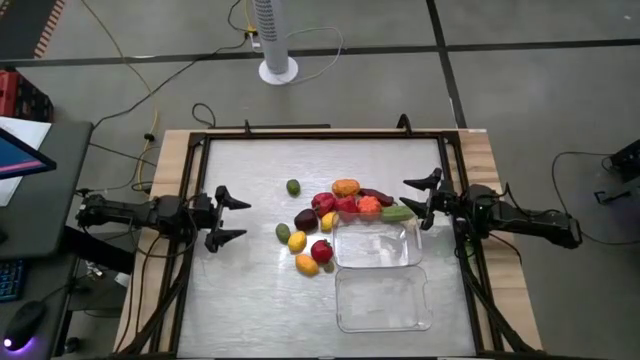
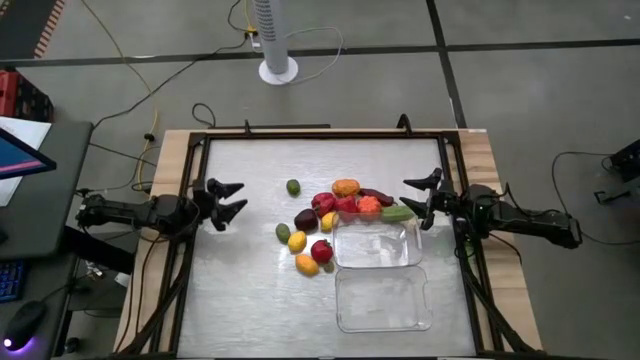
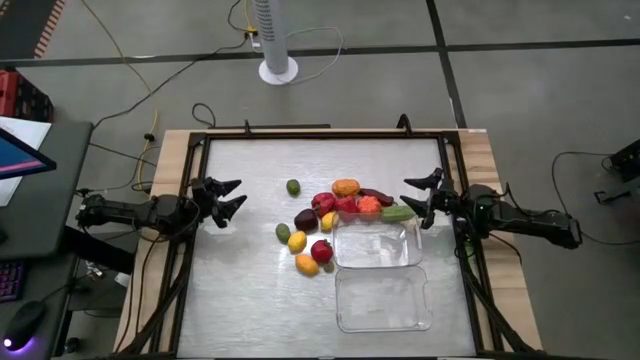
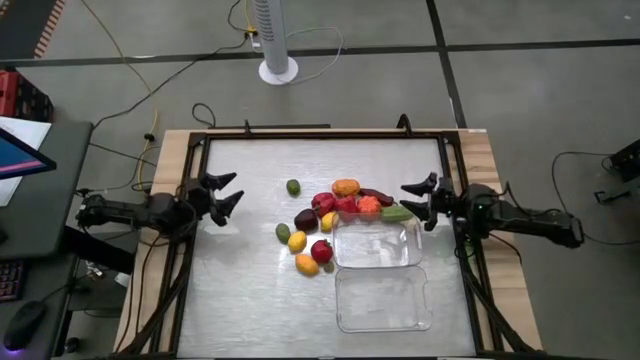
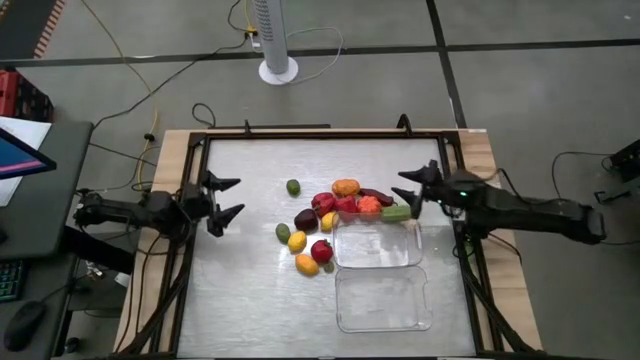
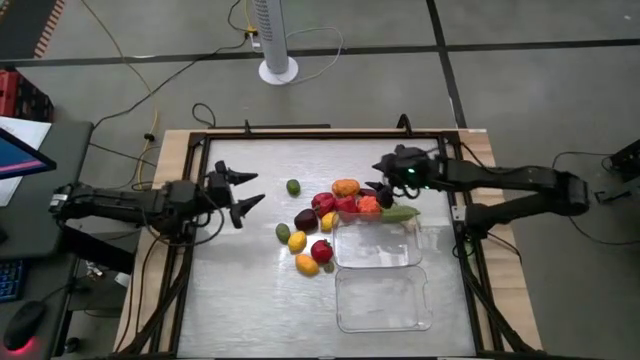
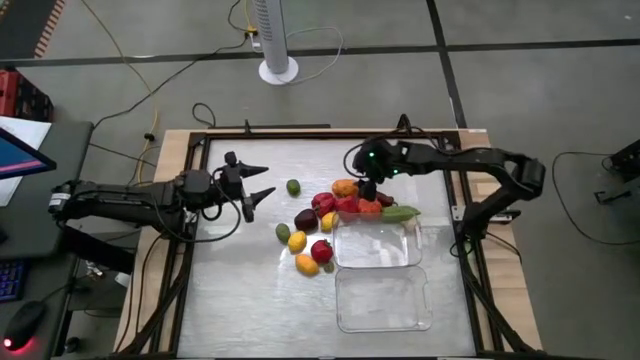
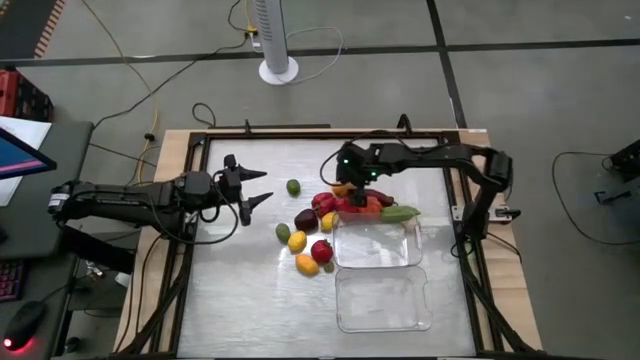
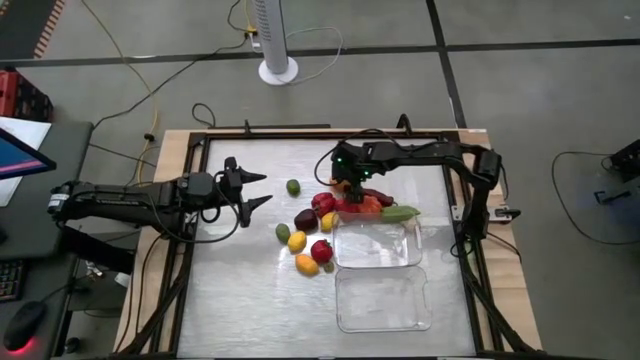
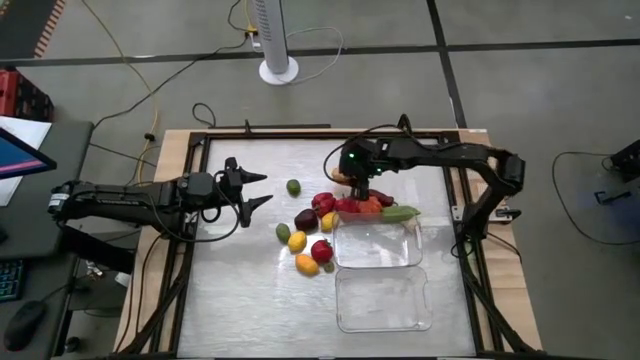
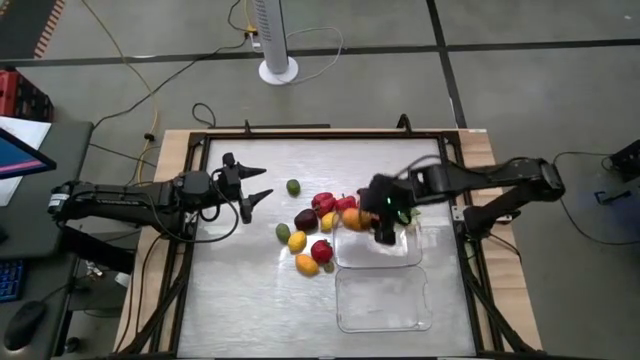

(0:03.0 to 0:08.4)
Task: Sort produce into baskets
Put the potato into the top transparent bin

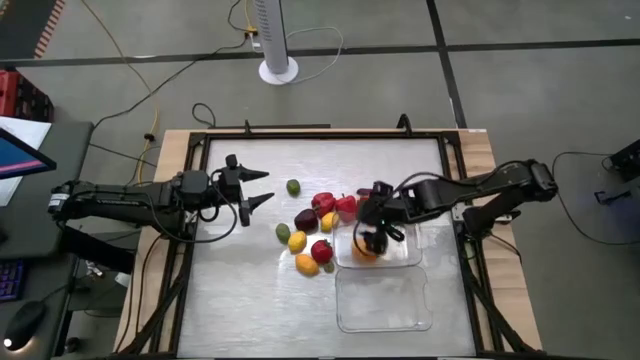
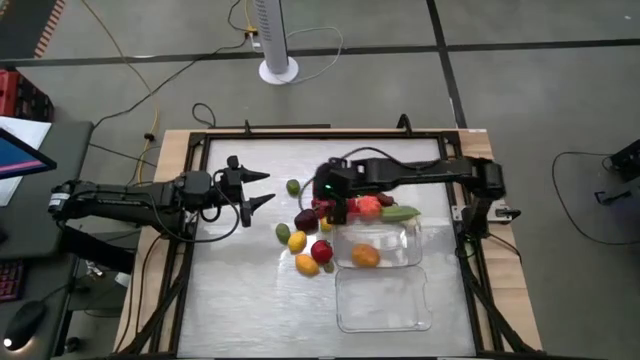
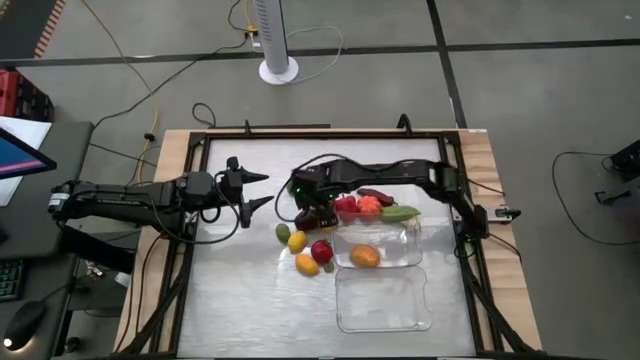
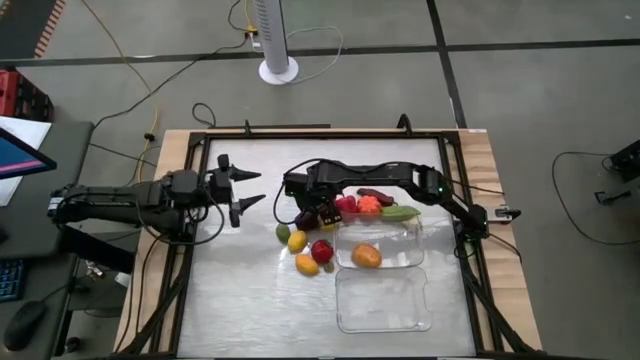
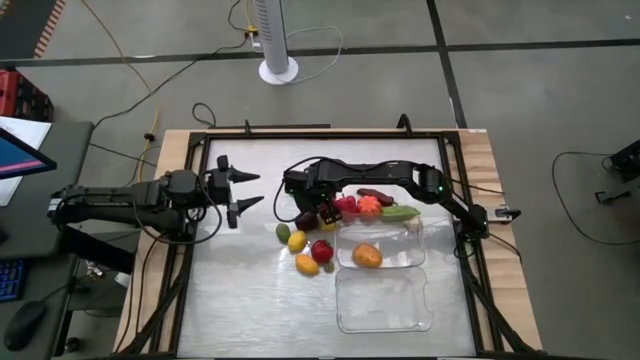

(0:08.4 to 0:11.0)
Put the apple into the bottom transparent bin

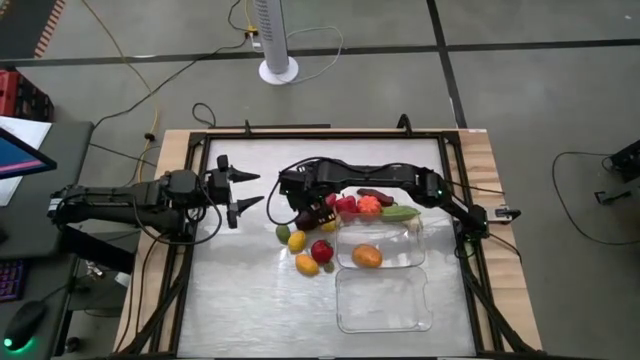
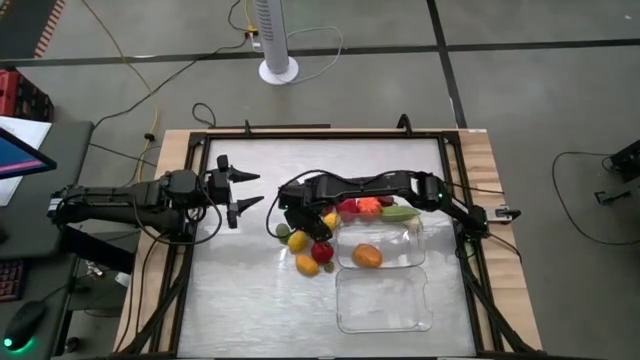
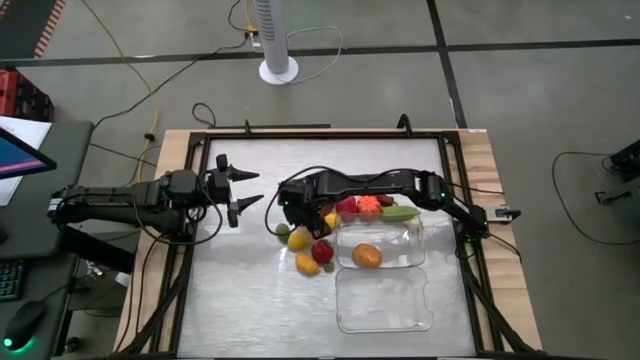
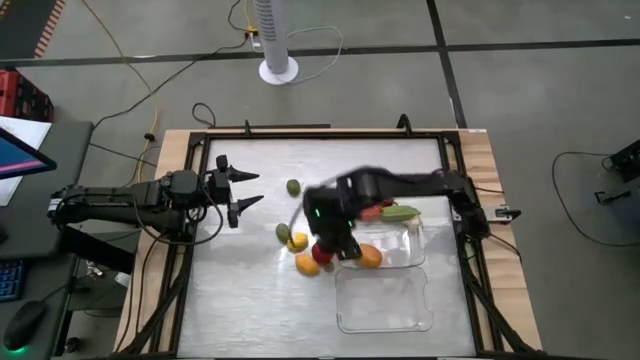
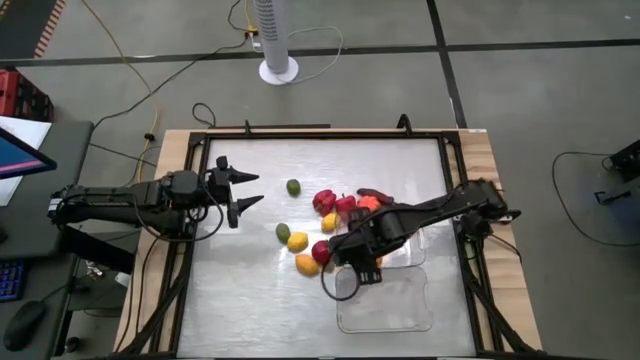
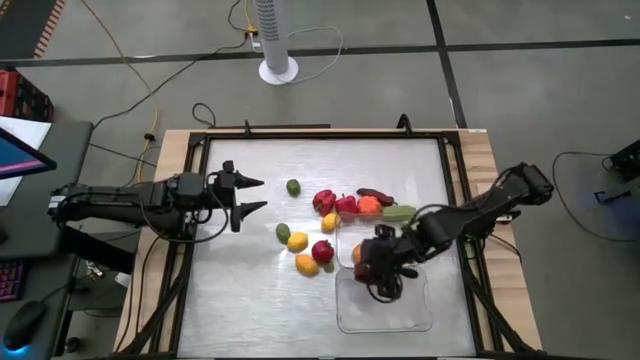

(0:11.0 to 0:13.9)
Put the apple into the bottom transparent bin

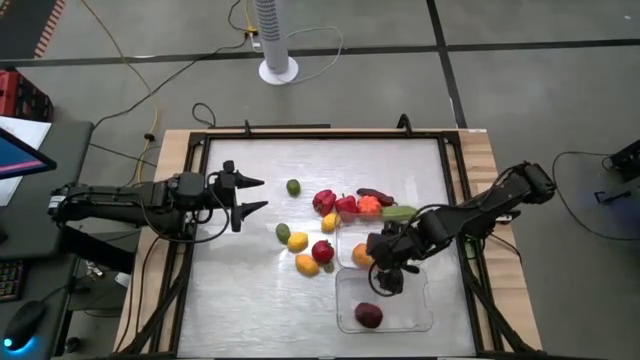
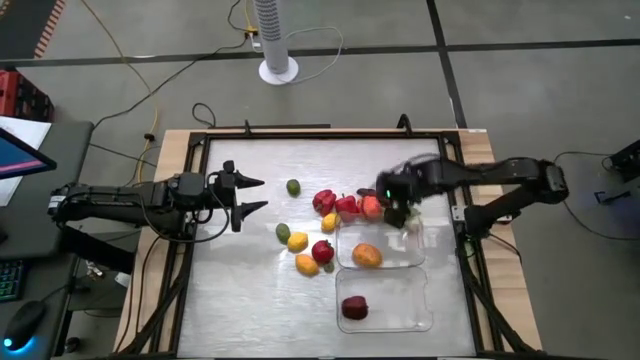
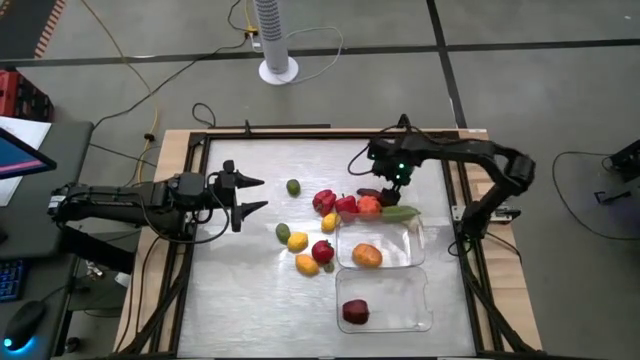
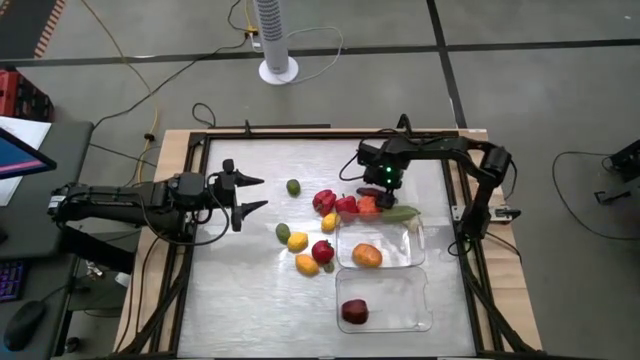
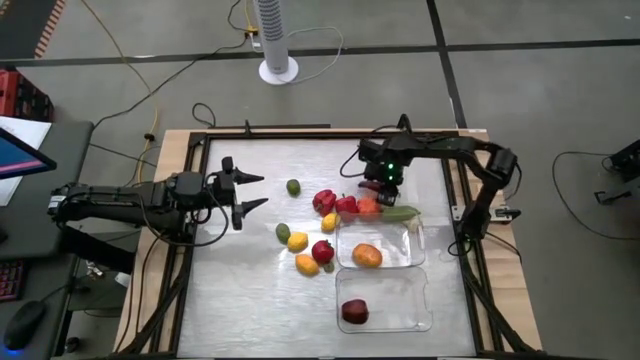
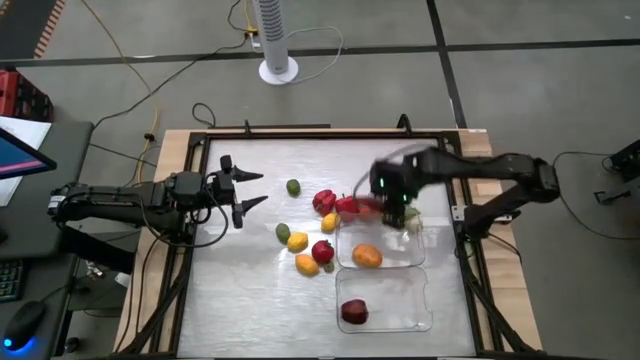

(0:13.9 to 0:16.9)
Put the chili pepper into the top transparent bin

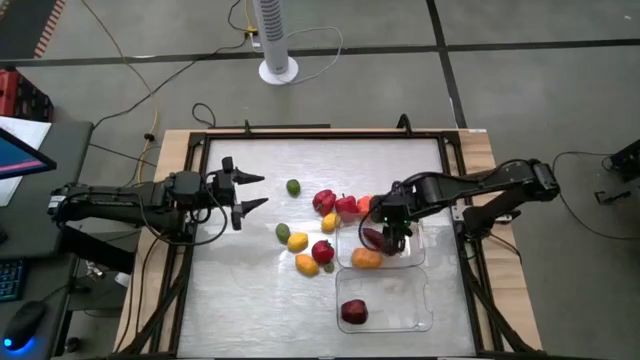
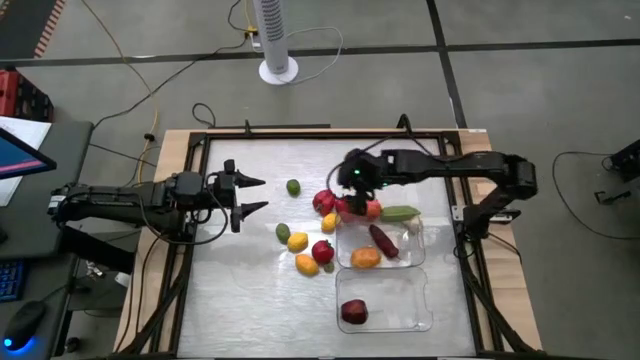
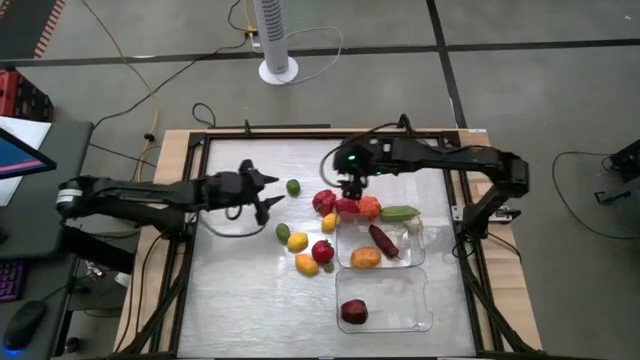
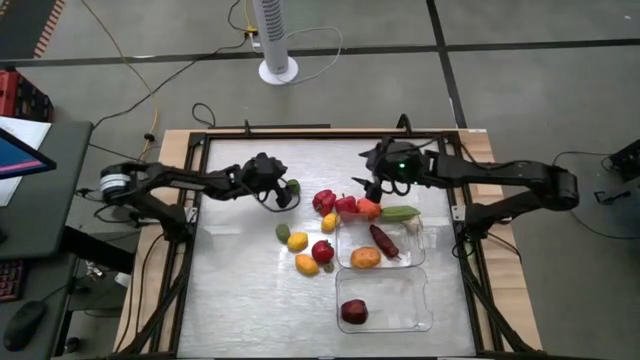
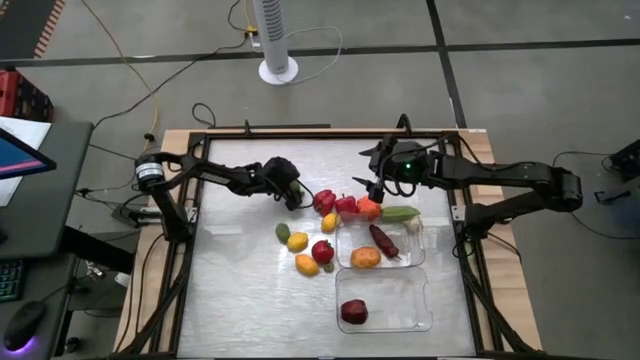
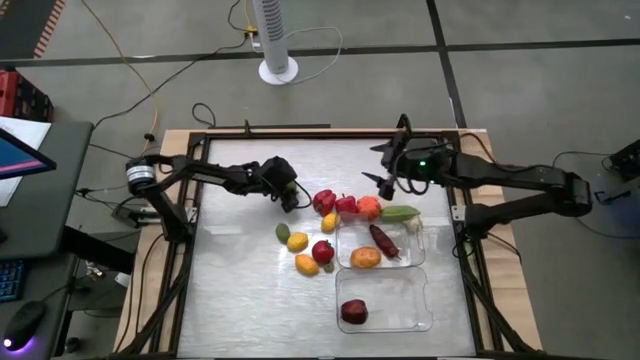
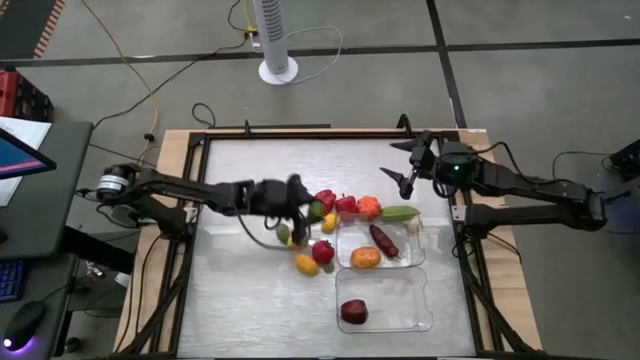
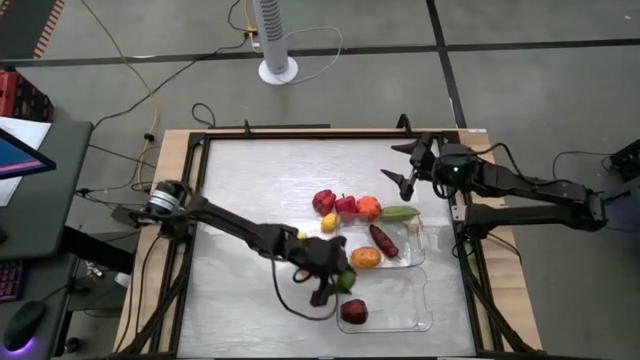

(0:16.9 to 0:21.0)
Put the lime into the bottom transparent bin

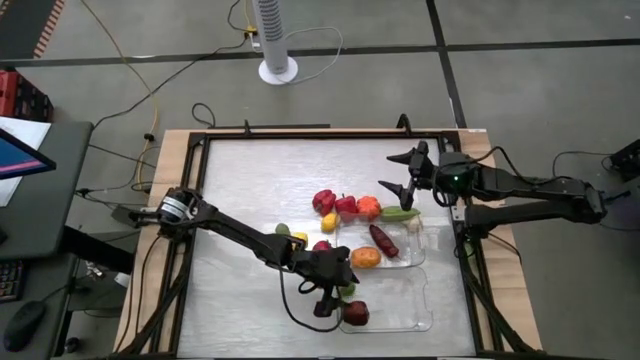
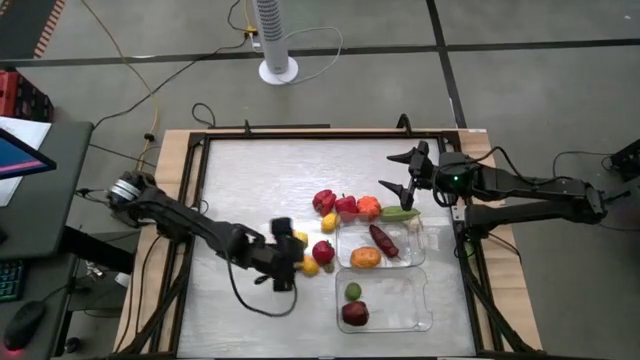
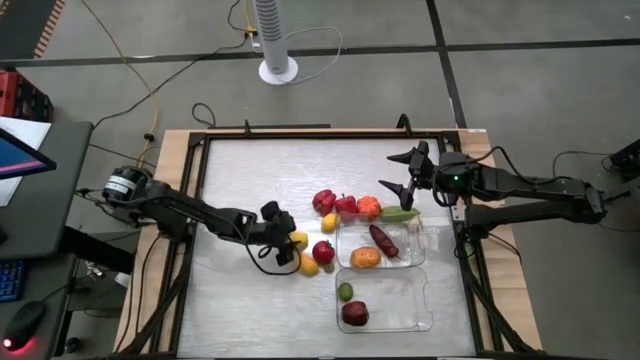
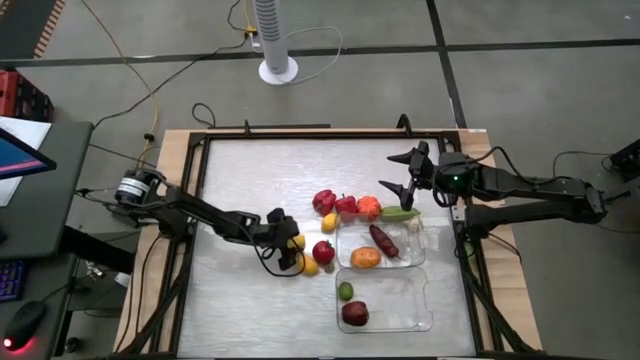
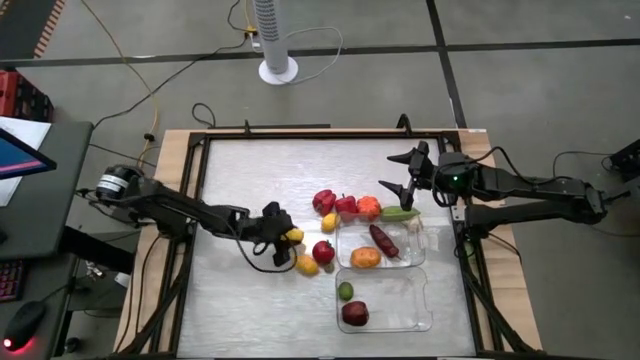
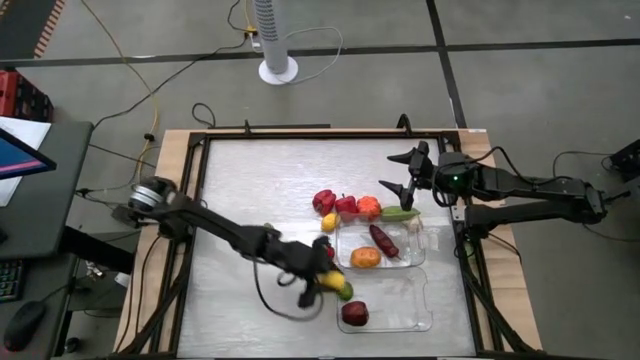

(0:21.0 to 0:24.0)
Put the lemon middle into the bottom transparent bin

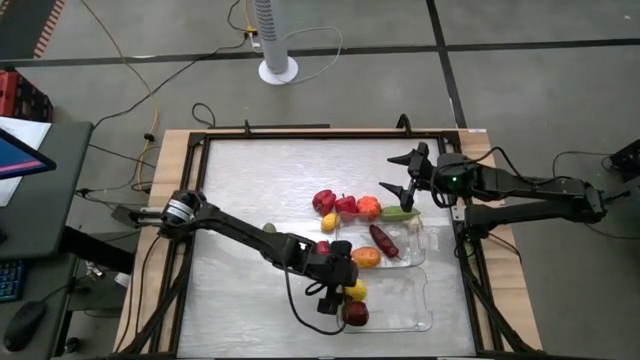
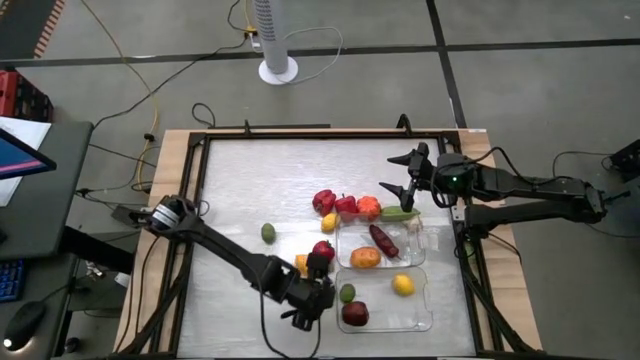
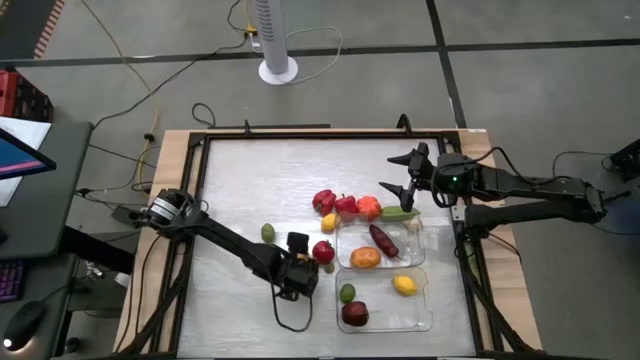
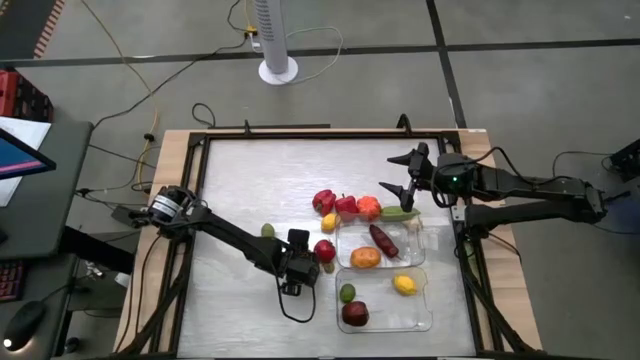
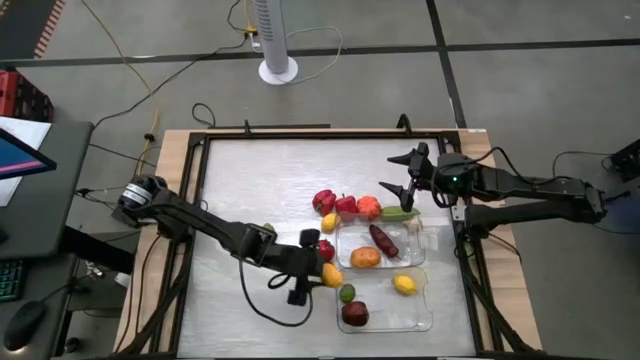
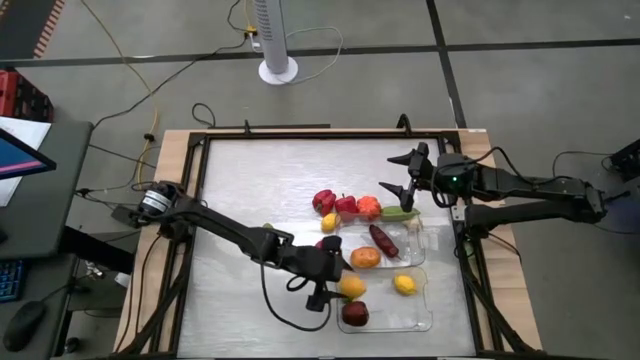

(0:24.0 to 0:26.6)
Put the bottom lemon into the bottom transparent bin
